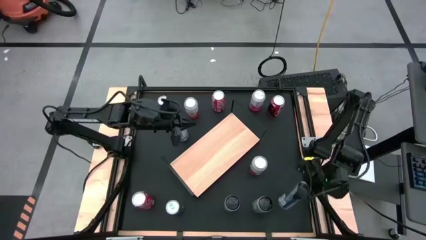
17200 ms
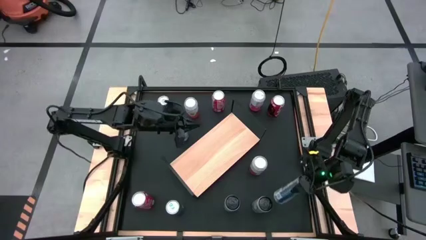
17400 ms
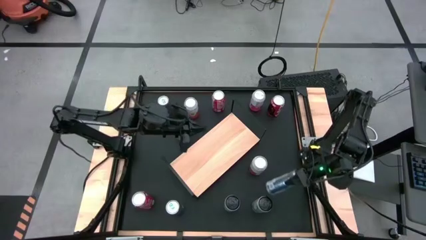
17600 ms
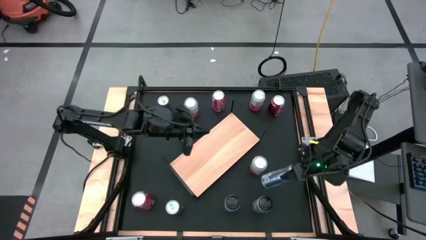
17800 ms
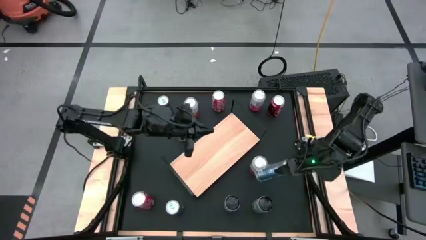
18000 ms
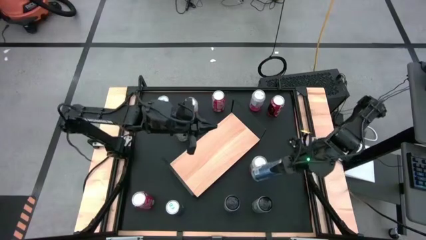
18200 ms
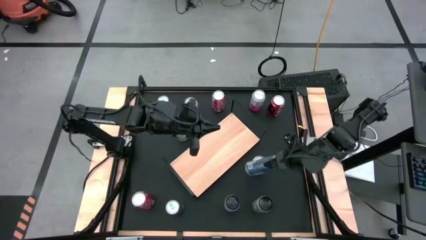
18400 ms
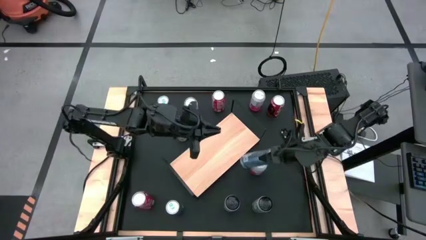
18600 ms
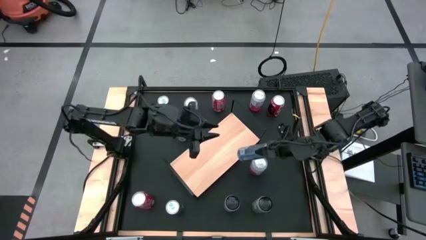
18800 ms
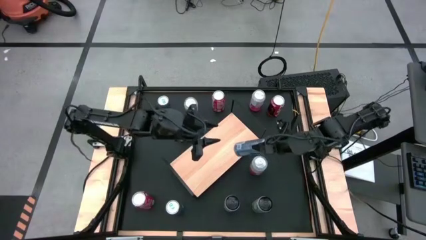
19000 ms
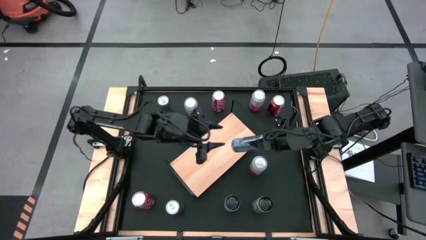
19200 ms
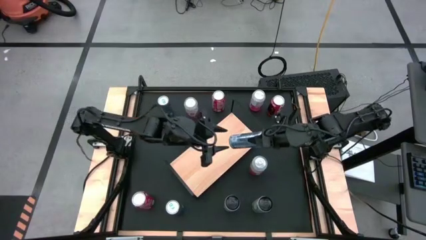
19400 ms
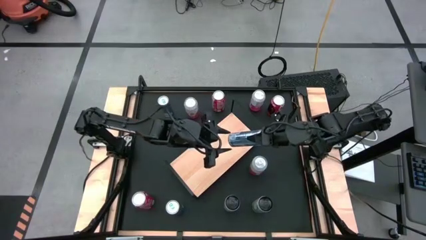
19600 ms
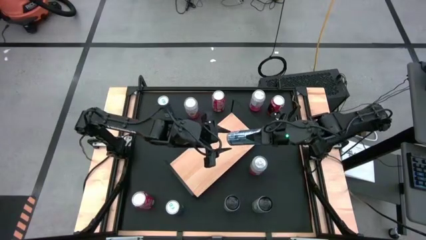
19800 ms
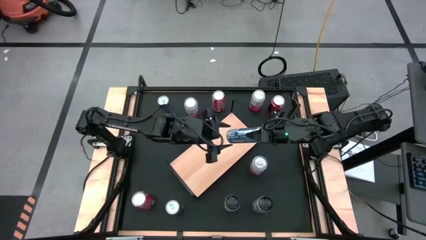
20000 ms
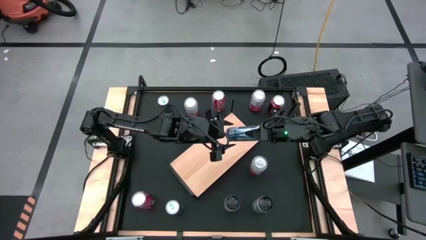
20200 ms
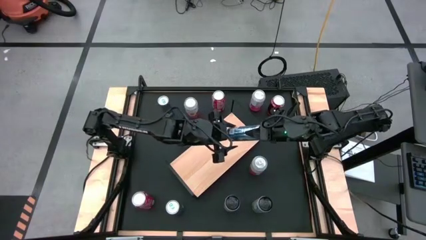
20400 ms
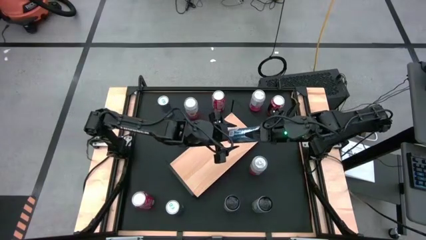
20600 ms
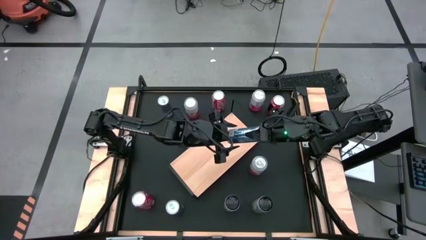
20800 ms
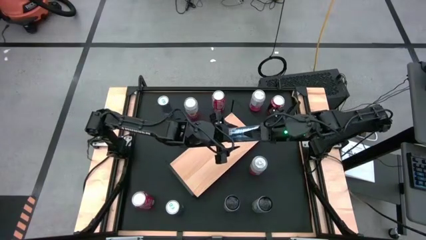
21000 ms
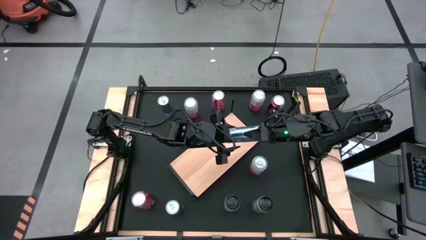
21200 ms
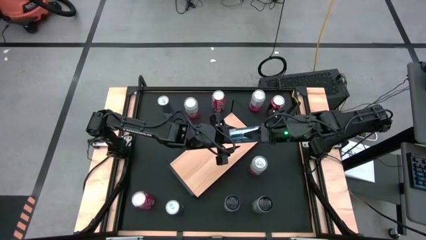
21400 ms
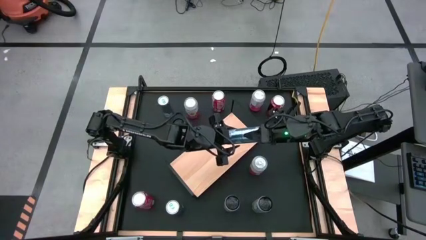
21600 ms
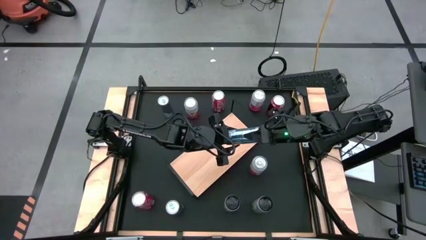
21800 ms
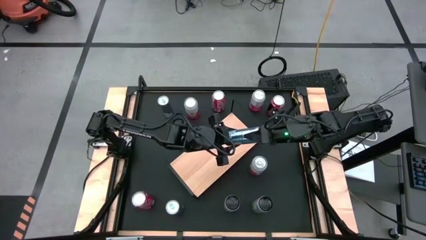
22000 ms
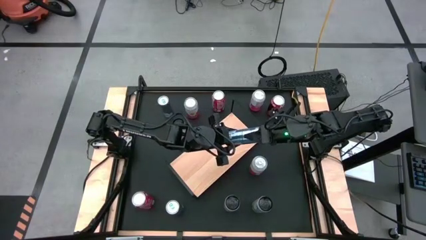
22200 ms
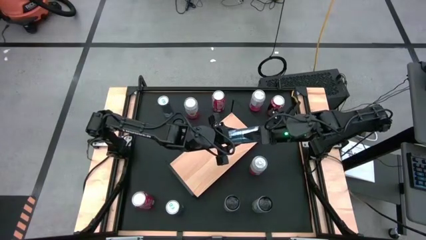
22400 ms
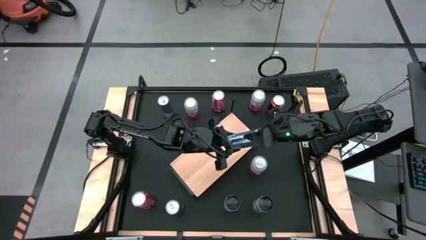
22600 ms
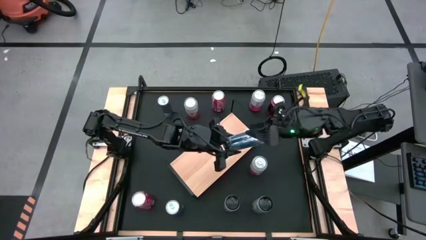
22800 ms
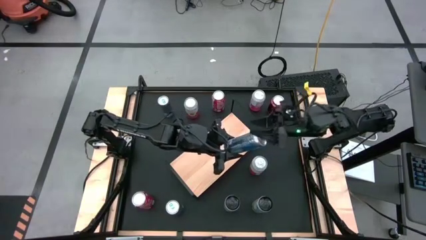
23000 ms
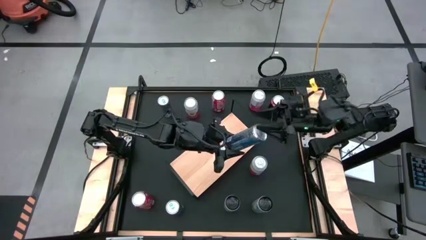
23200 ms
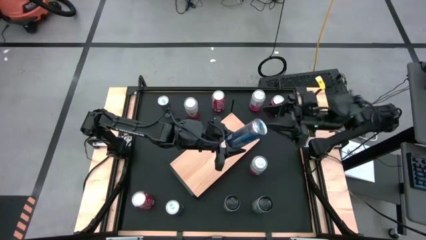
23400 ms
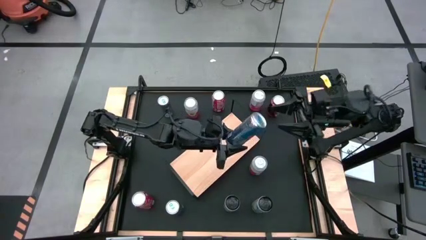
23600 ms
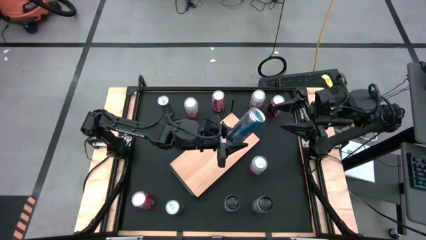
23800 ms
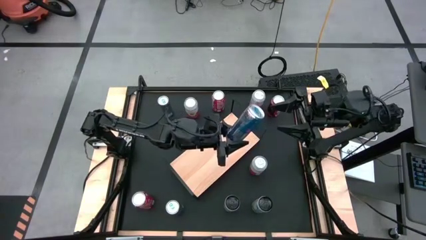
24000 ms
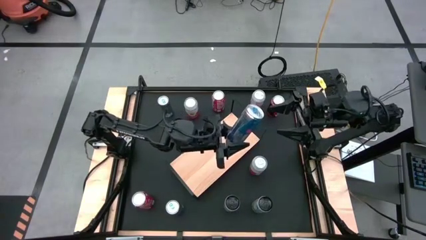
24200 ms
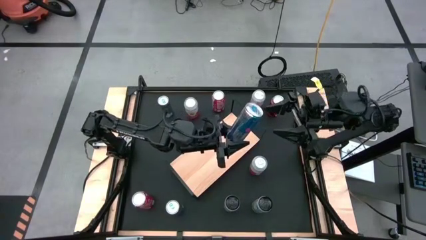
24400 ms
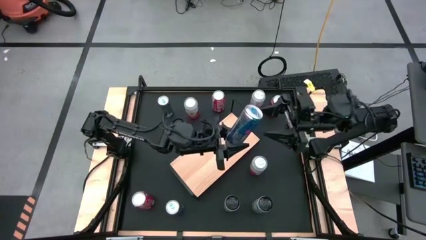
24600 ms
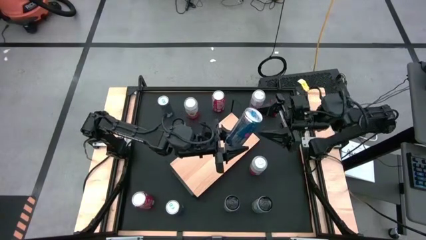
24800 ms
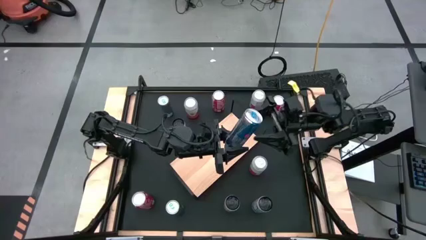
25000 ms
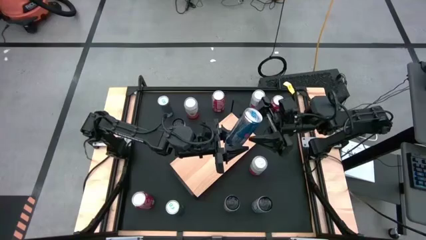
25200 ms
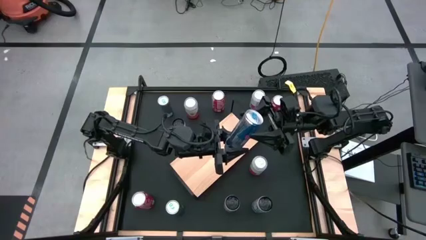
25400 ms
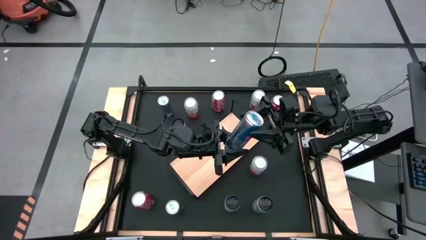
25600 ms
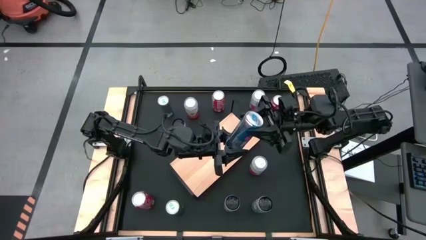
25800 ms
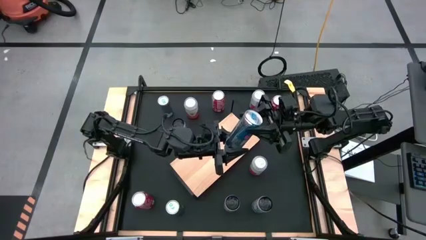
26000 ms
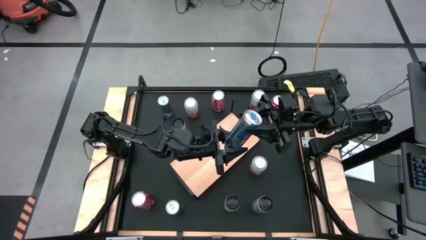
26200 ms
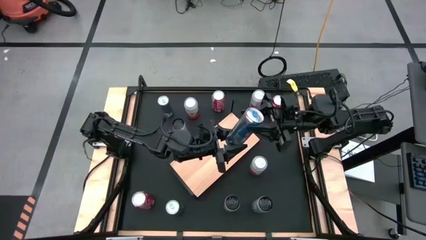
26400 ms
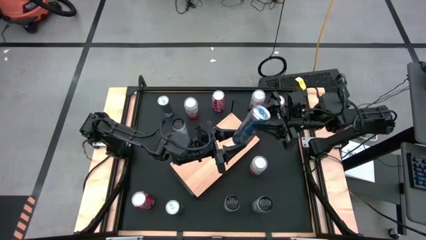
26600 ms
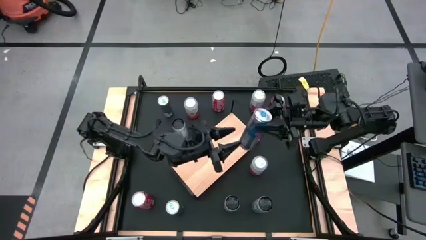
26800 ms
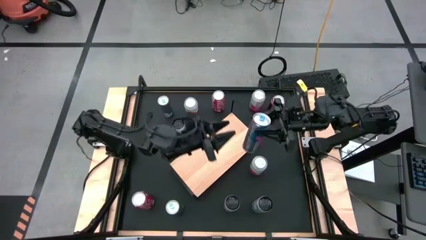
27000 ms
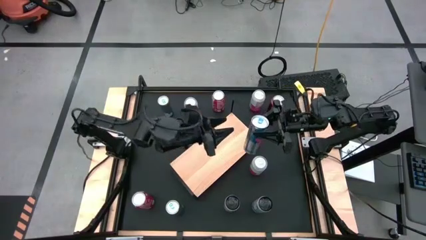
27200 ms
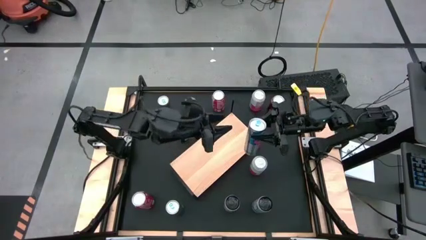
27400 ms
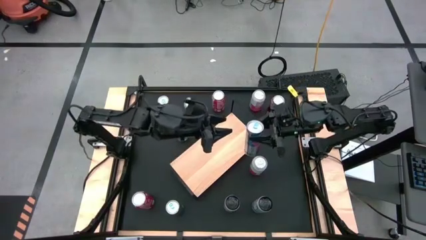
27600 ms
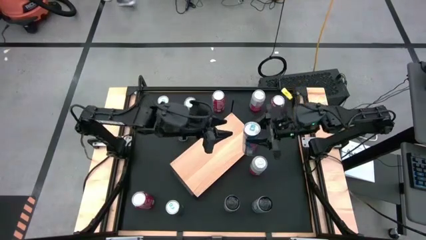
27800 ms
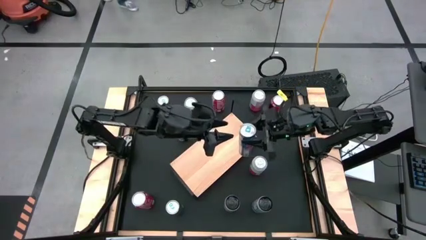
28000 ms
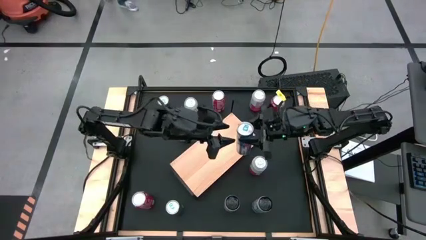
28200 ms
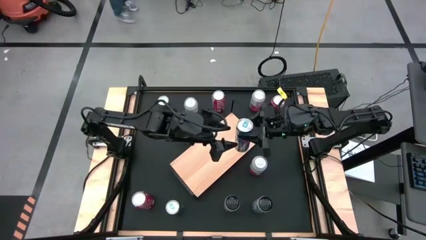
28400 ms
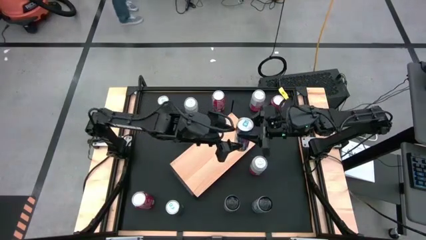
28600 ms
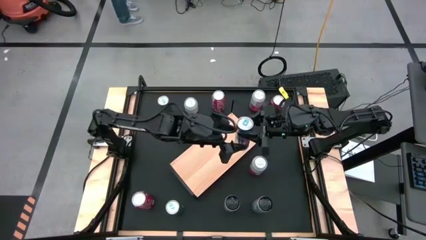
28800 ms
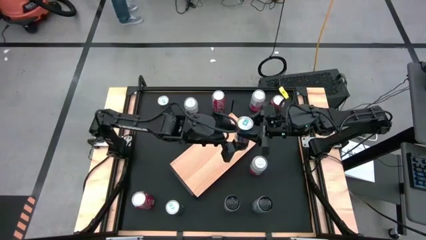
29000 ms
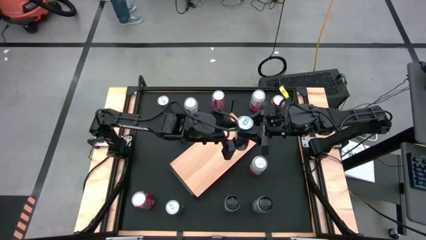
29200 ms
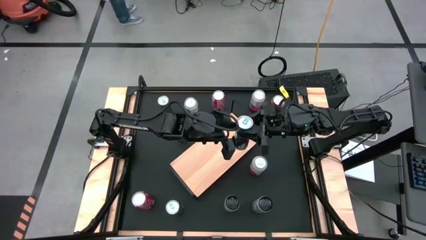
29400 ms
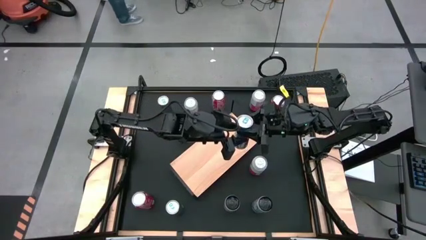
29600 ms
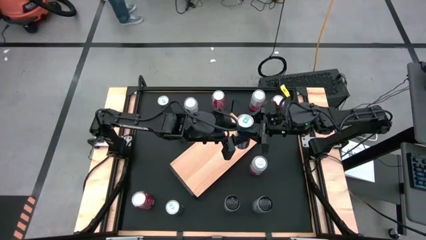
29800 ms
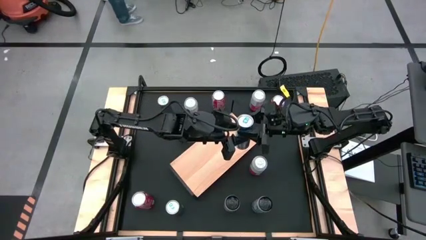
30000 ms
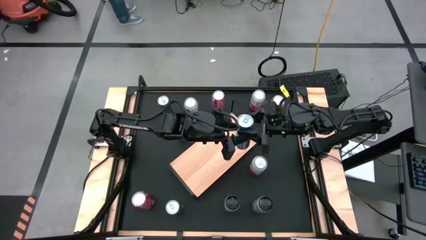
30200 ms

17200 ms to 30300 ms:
Task: Place canned beverage on shelf
Put the bottom right blue soda can on the shelf
